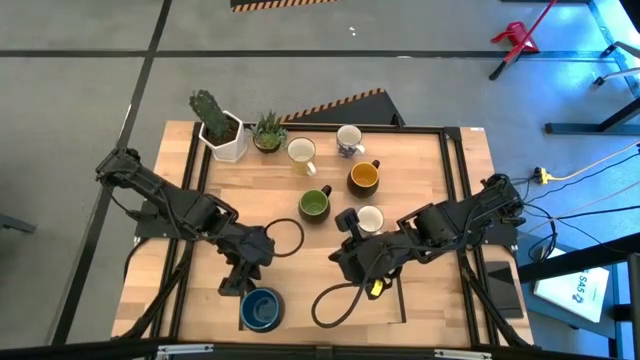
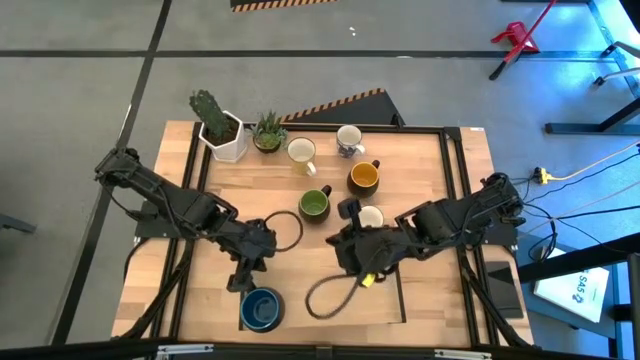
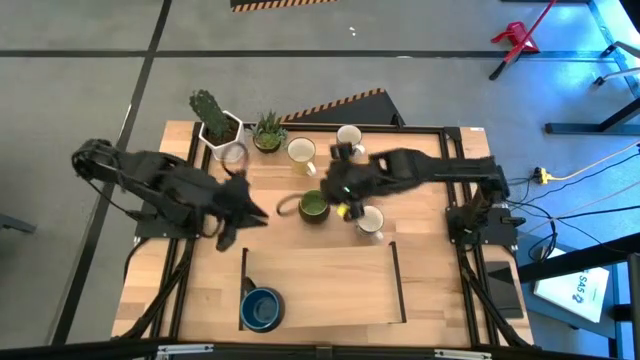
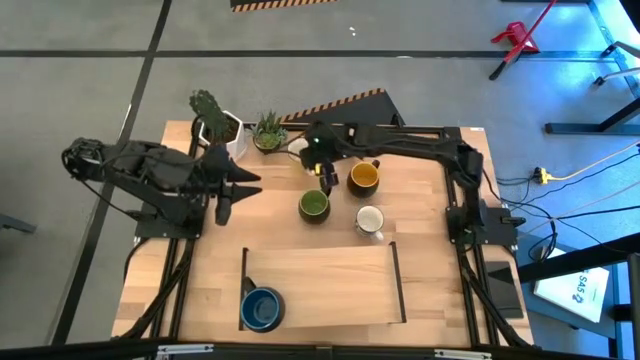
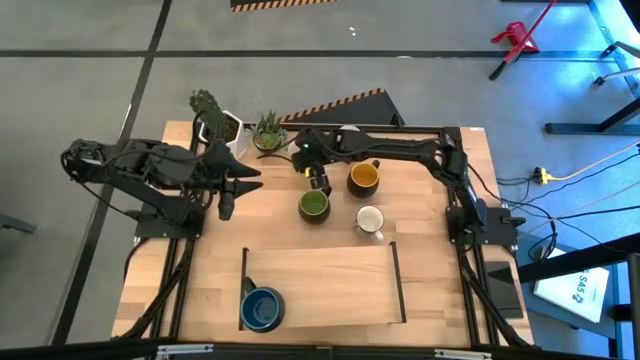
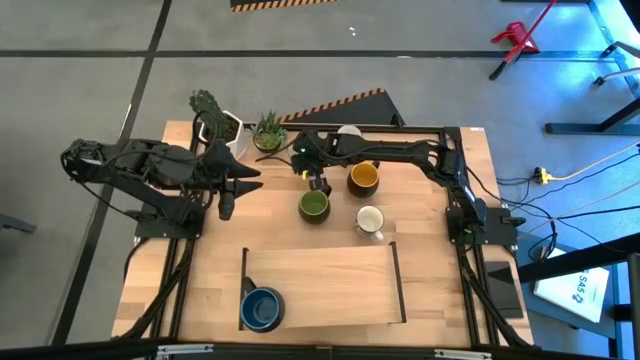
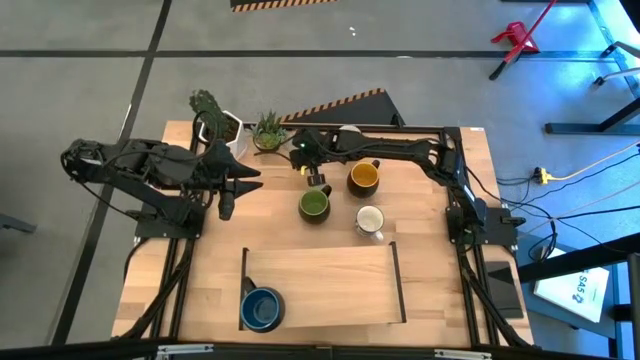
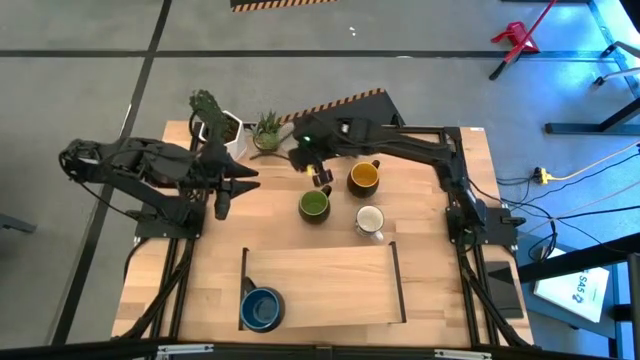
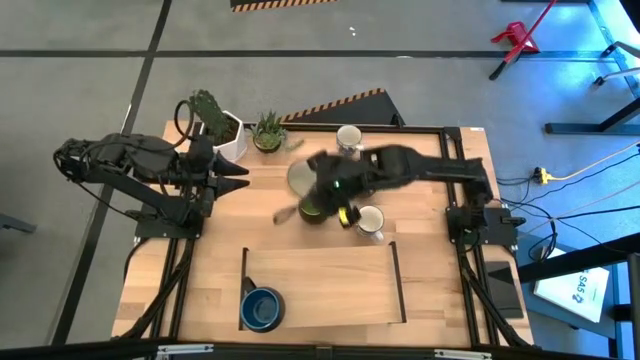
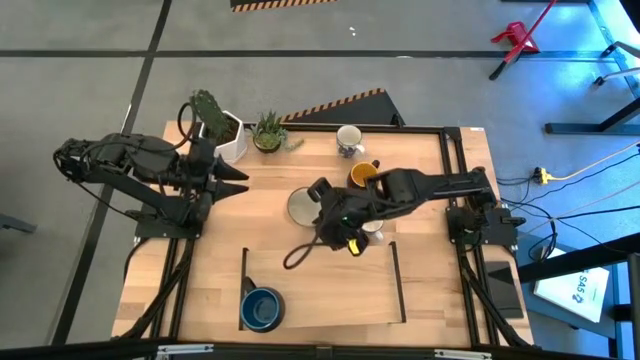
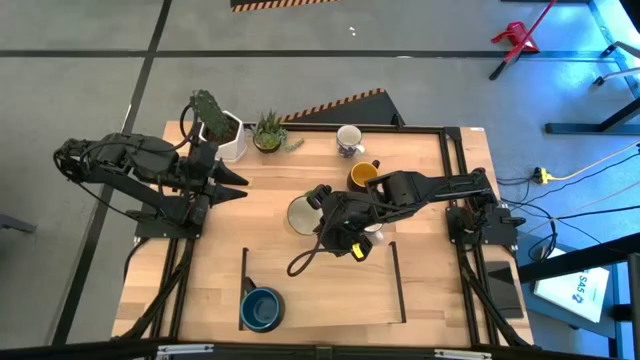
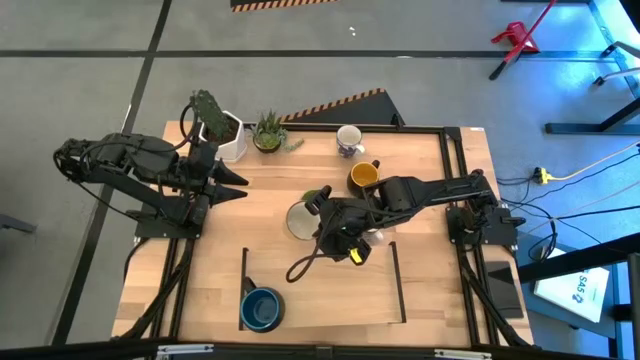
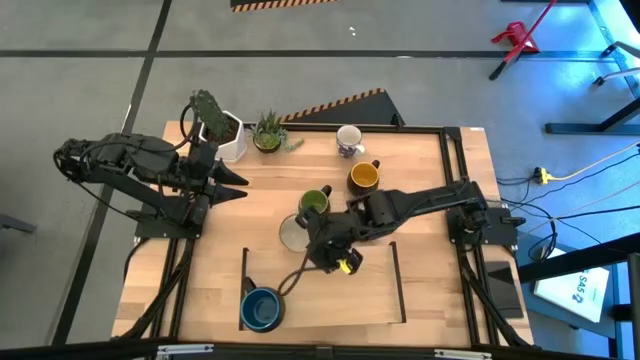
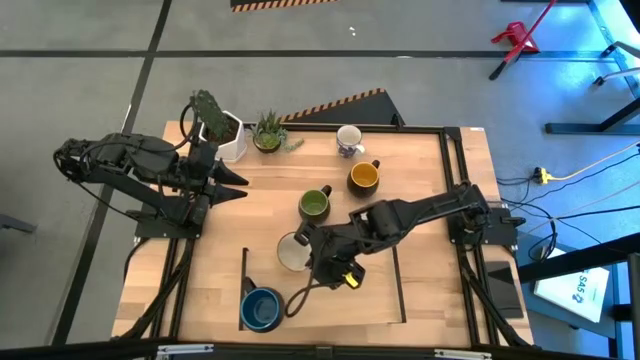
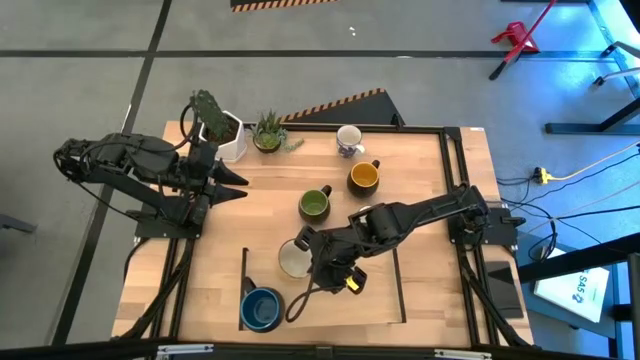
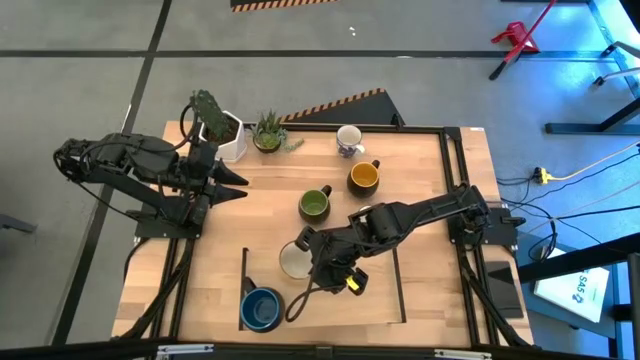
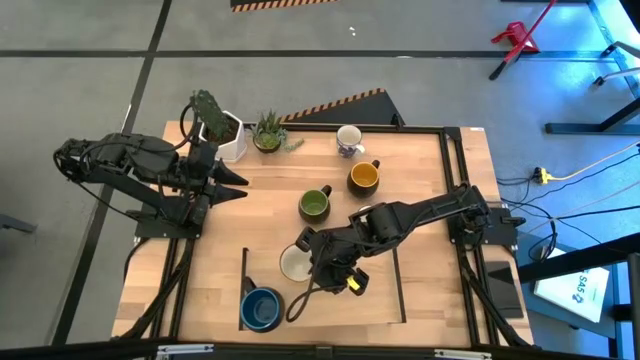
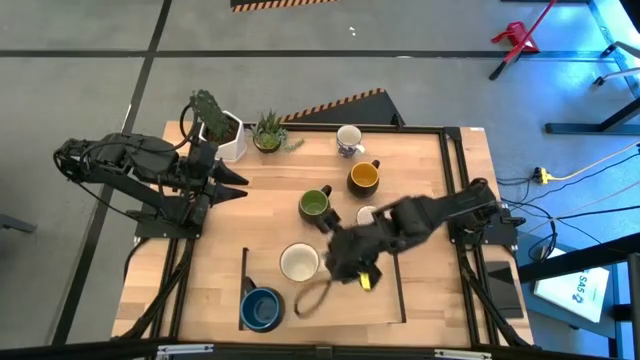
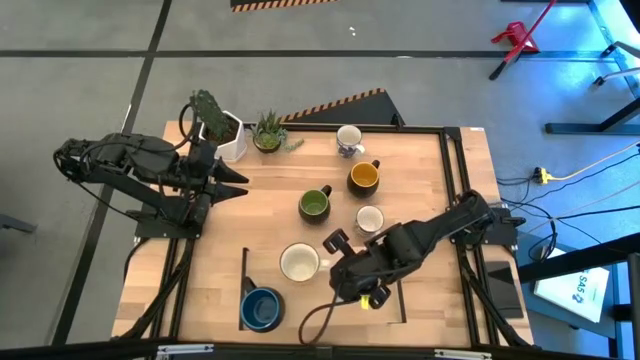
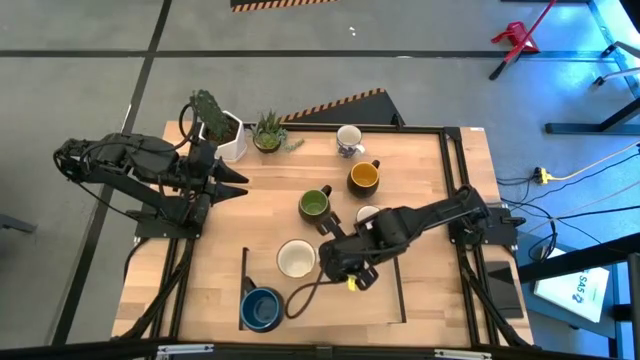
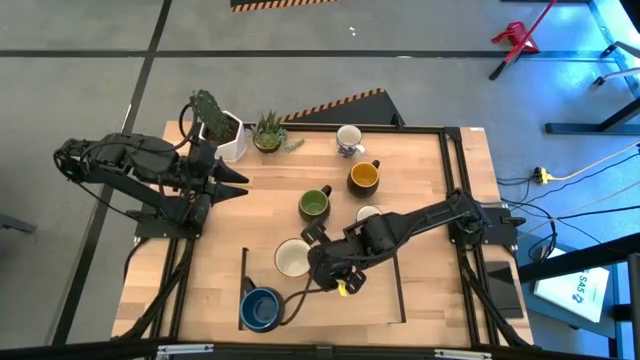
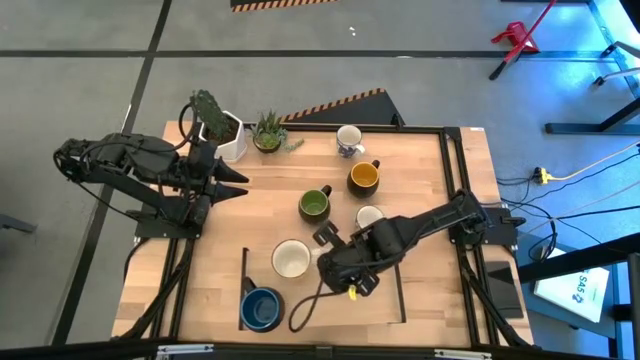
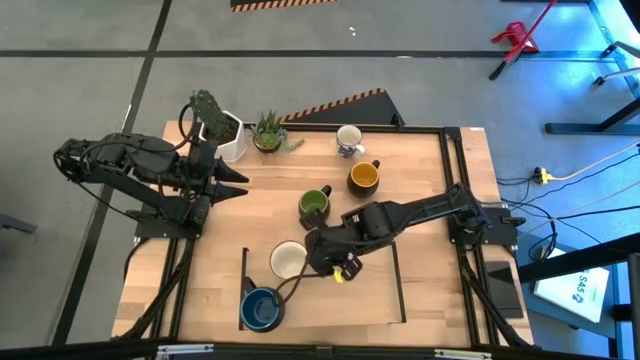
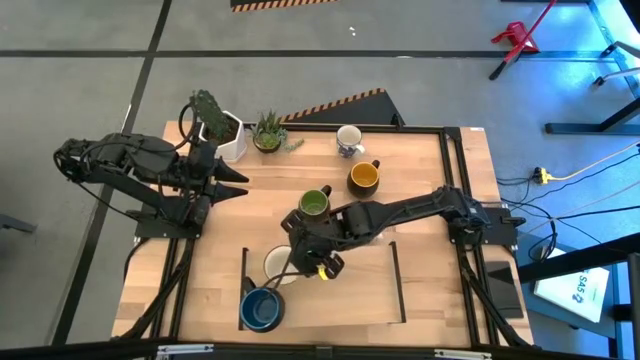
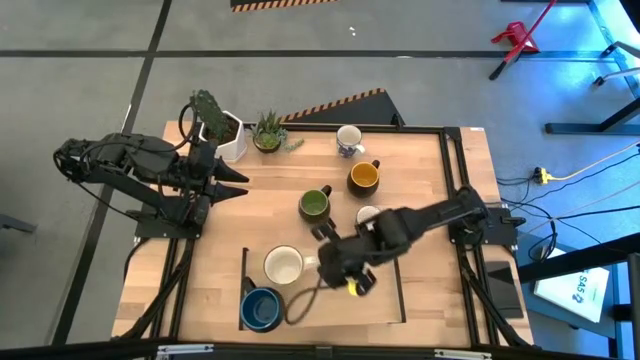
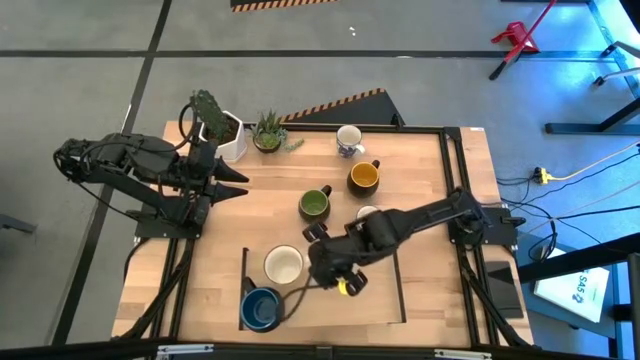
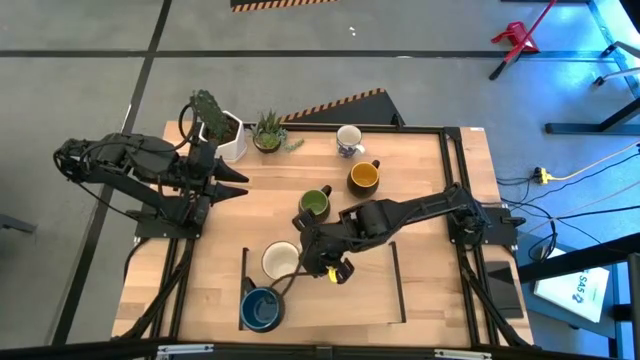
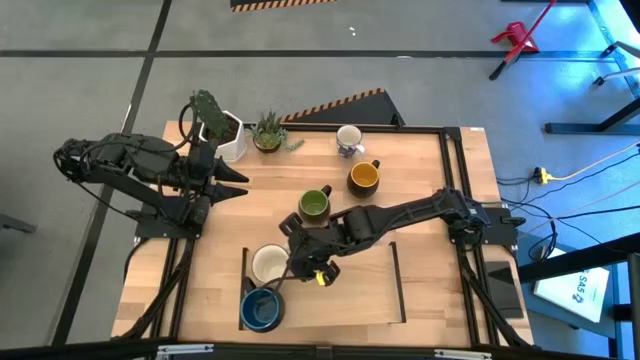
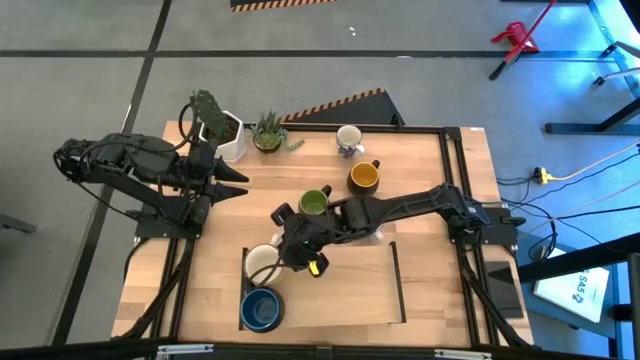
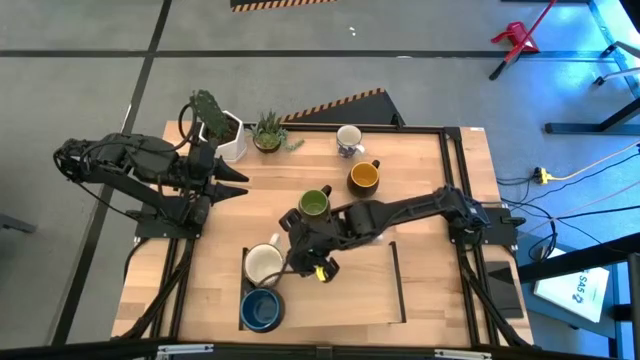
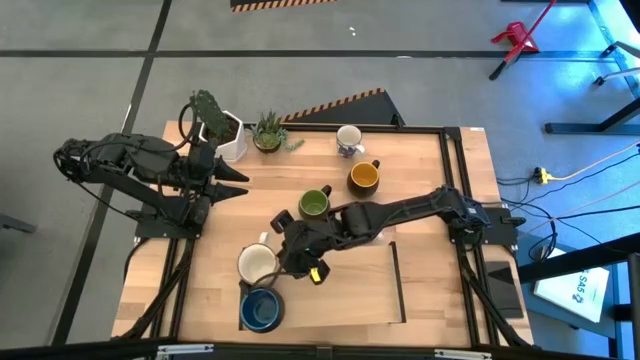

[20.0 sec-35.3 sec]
Task: Place coffee mugs
Put the light yellow mug on the shelf

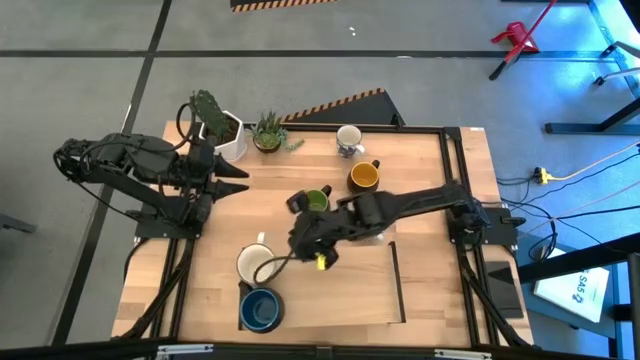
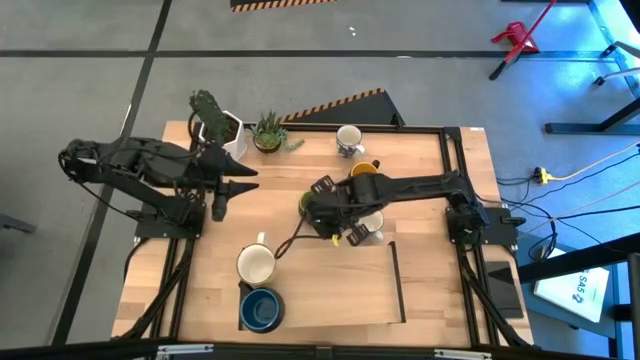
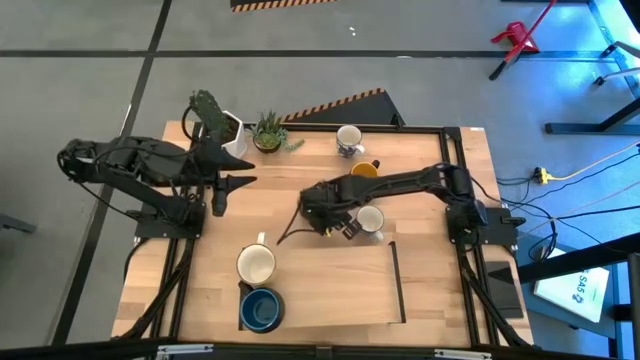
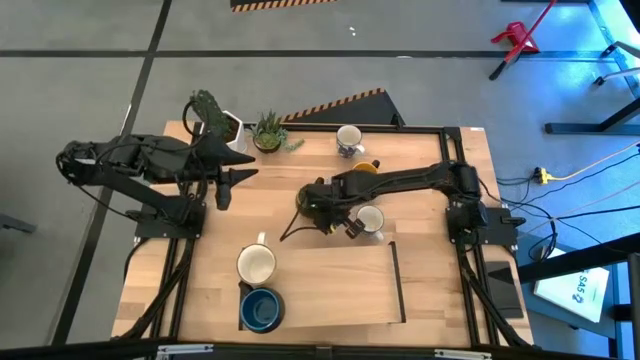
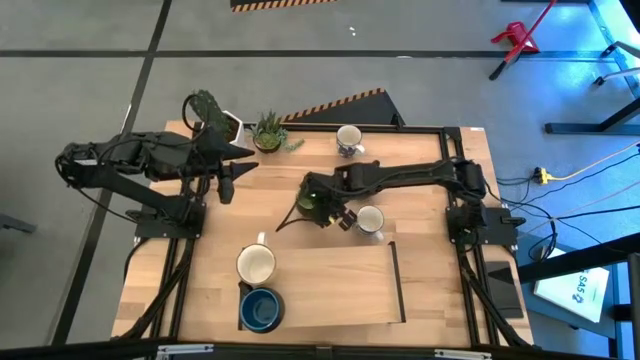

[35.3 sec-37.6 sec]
Put the green mug on the shelf

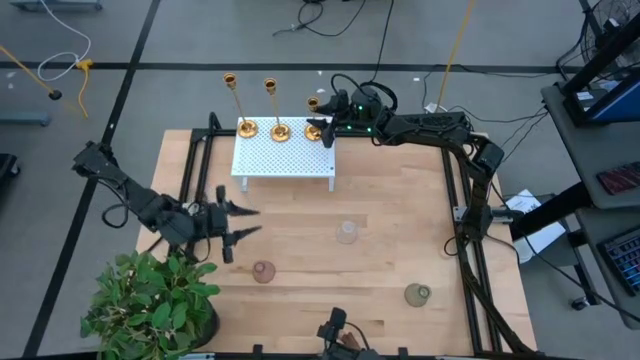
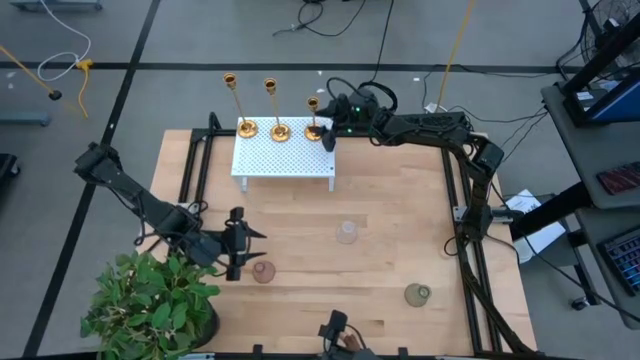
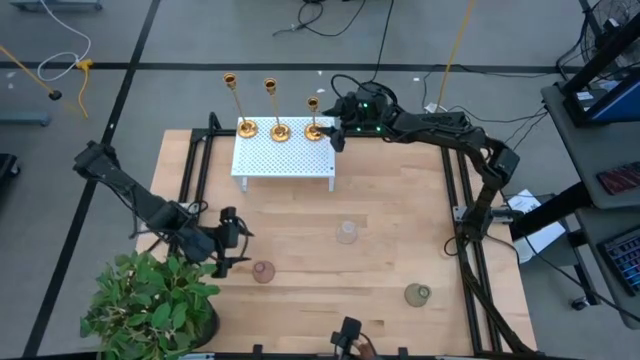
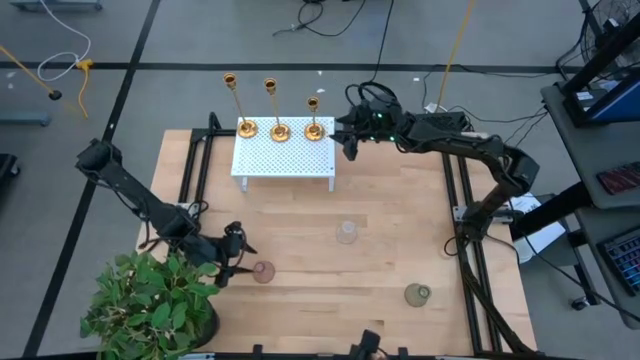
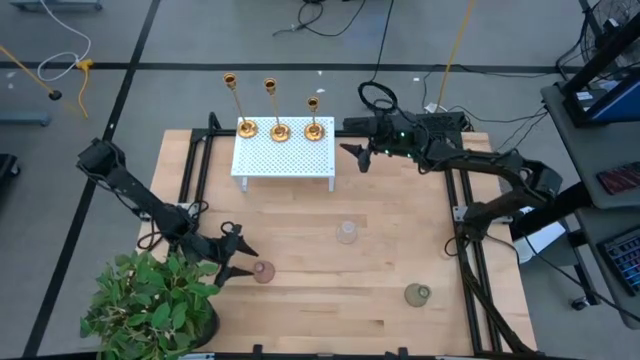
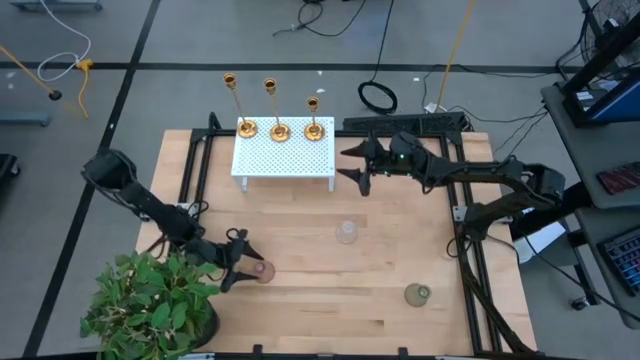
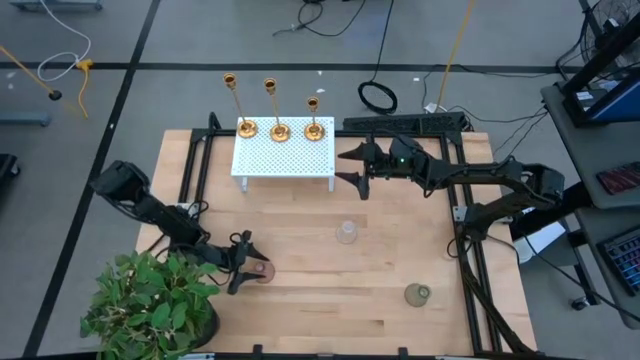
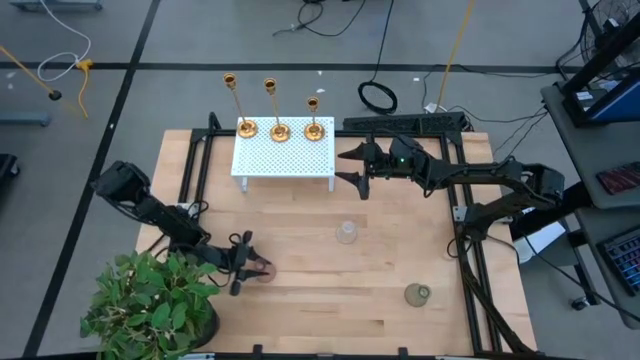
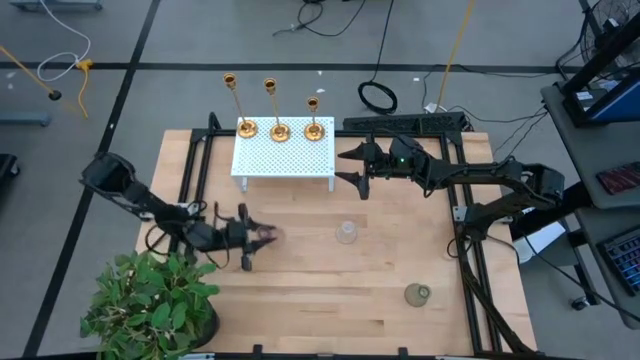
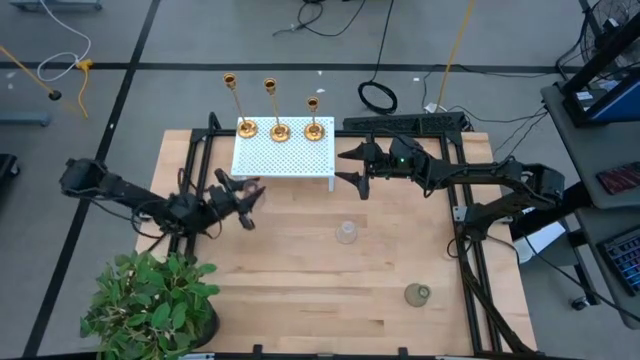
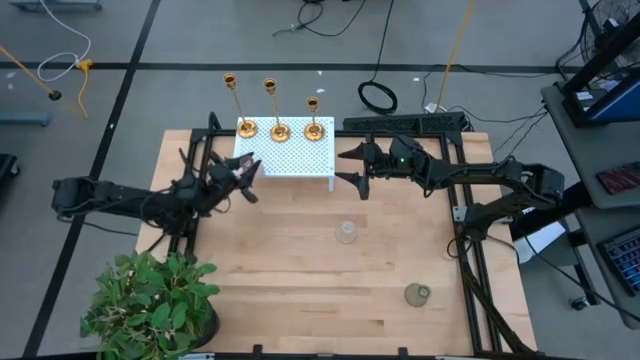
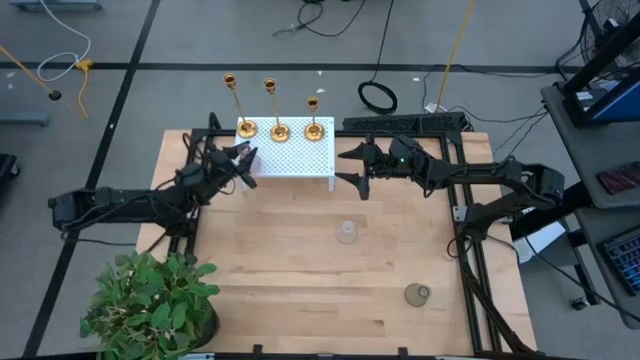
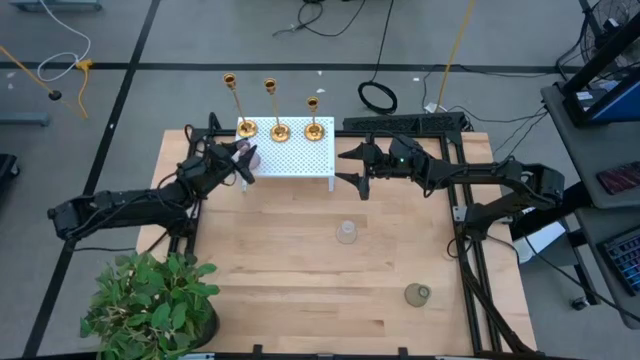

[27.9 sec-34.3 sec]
Task: Pick & Place candle stick holders
Put the pink candle holder on the shelf
